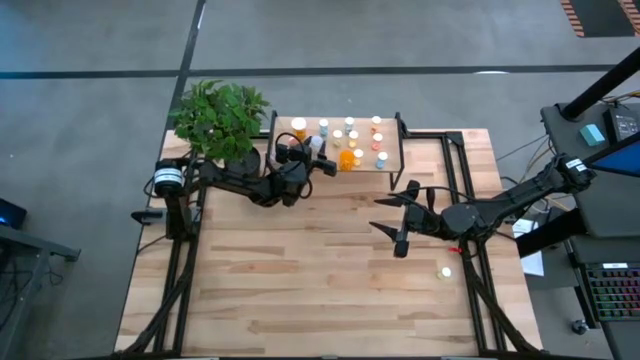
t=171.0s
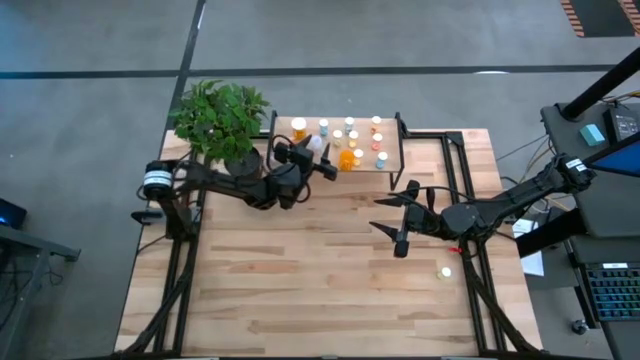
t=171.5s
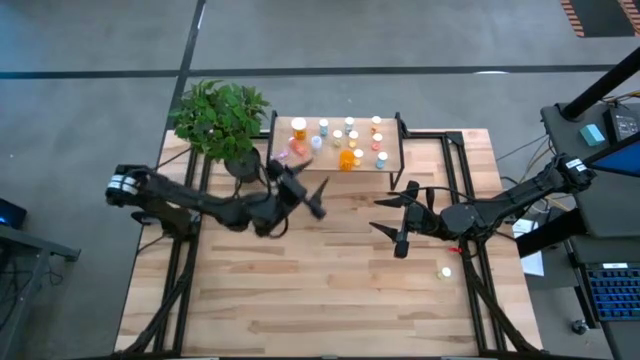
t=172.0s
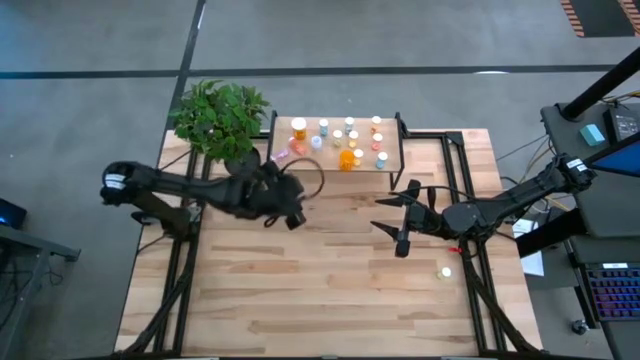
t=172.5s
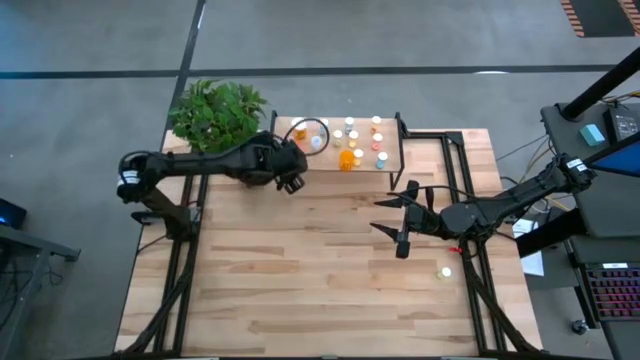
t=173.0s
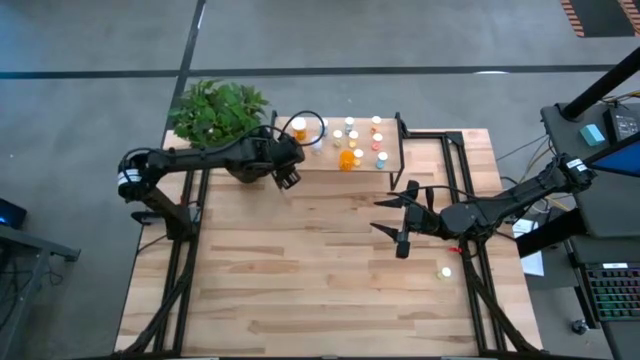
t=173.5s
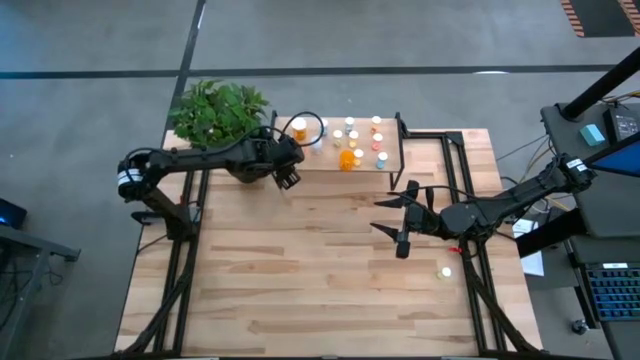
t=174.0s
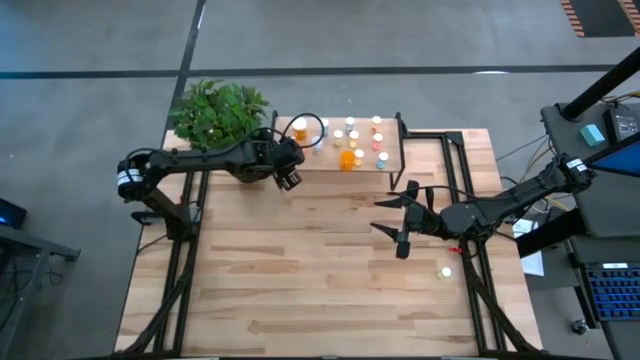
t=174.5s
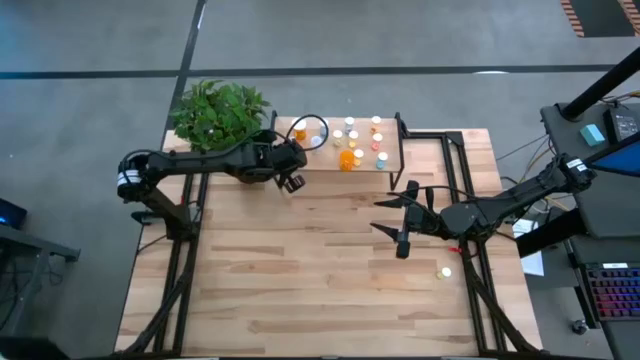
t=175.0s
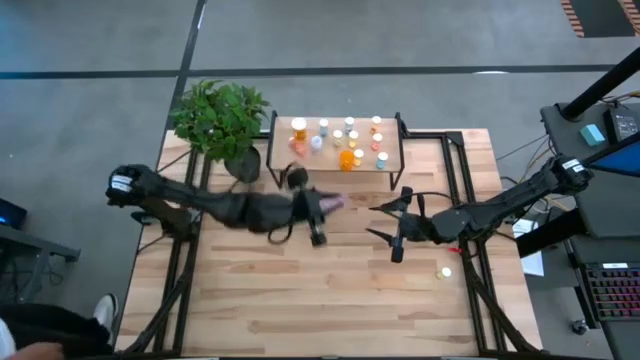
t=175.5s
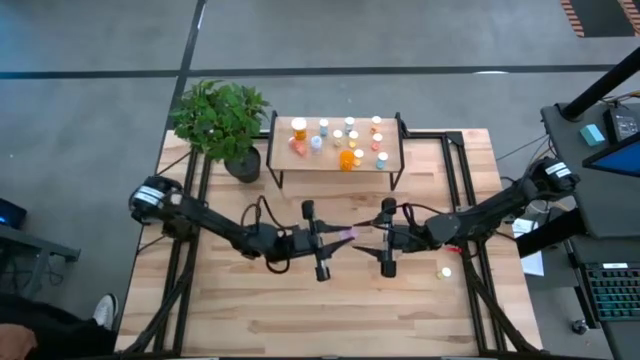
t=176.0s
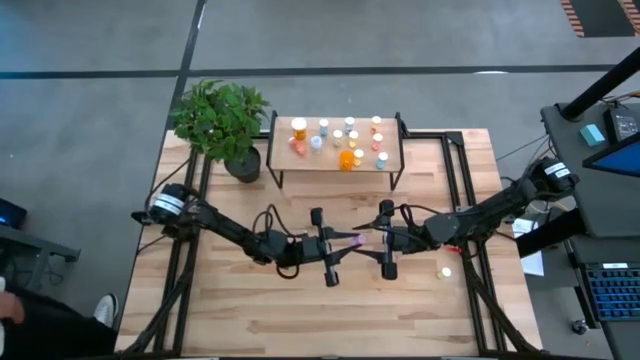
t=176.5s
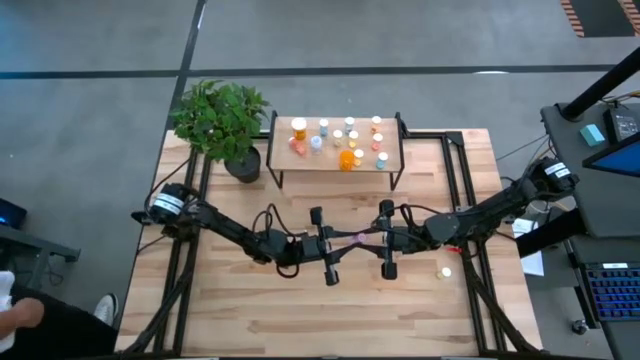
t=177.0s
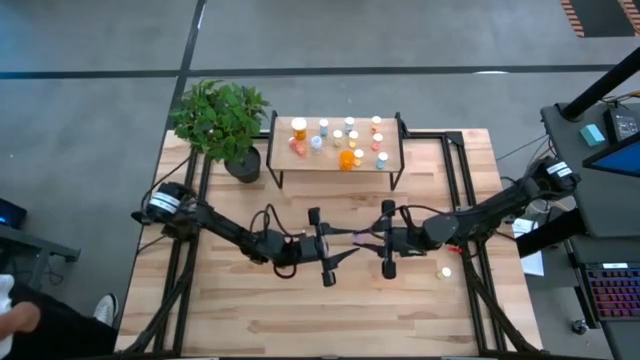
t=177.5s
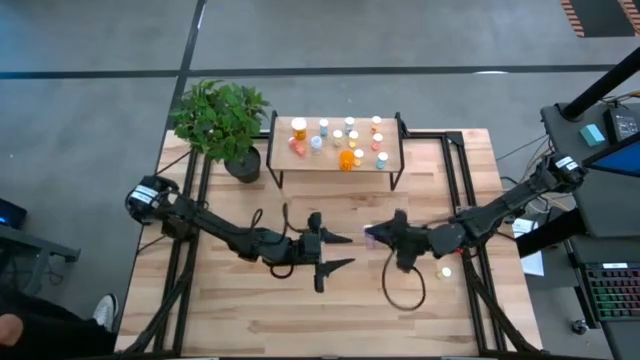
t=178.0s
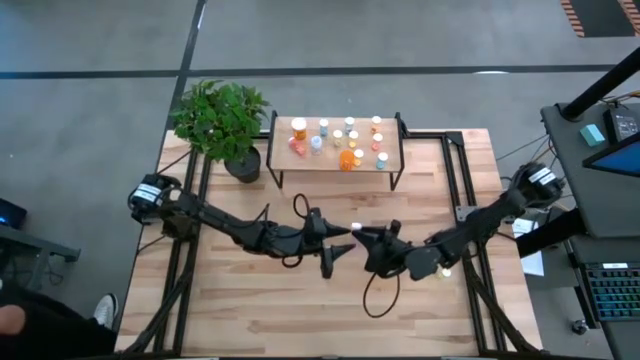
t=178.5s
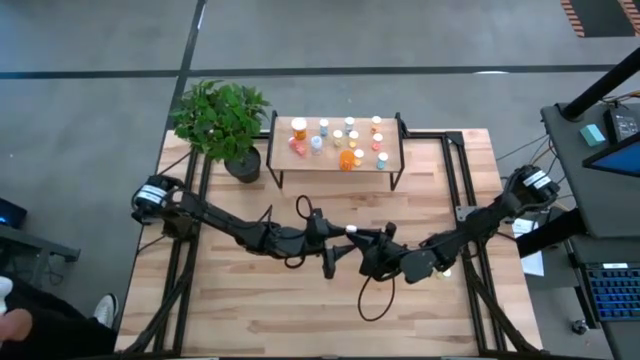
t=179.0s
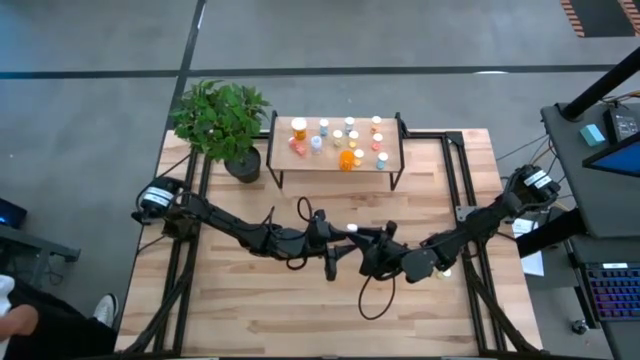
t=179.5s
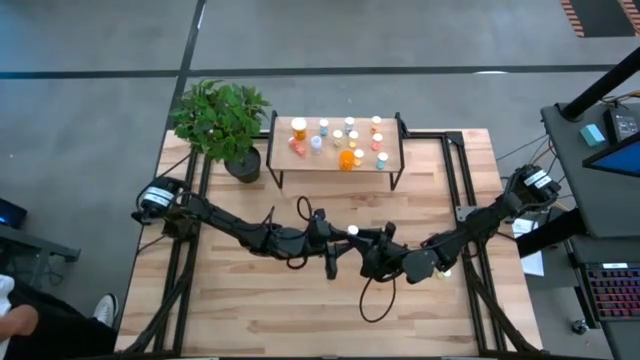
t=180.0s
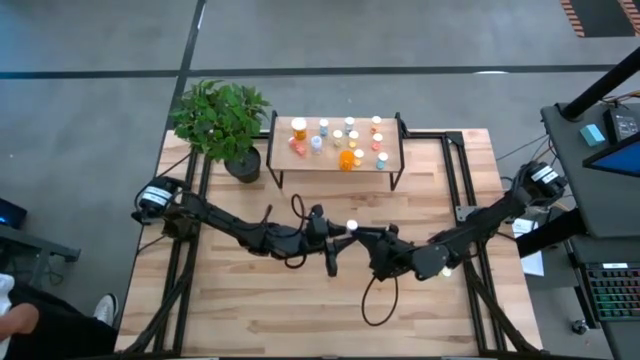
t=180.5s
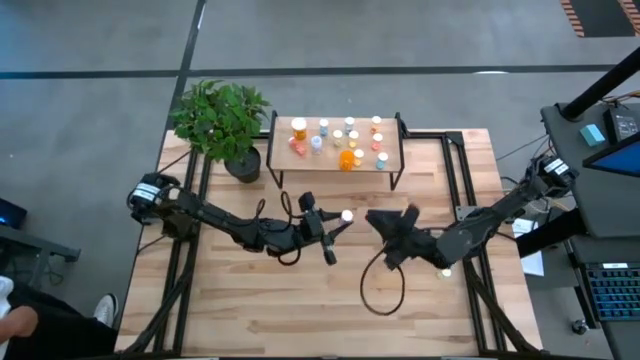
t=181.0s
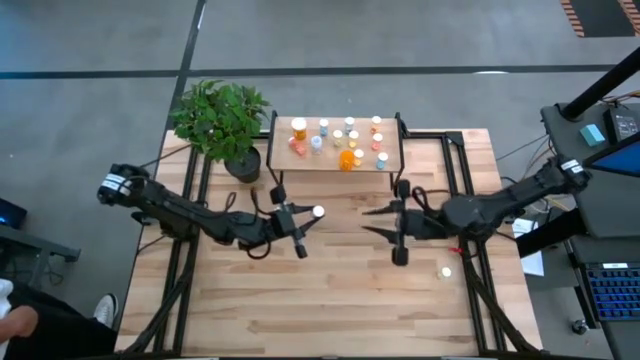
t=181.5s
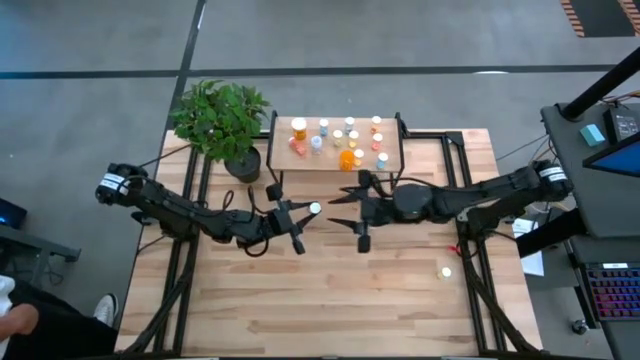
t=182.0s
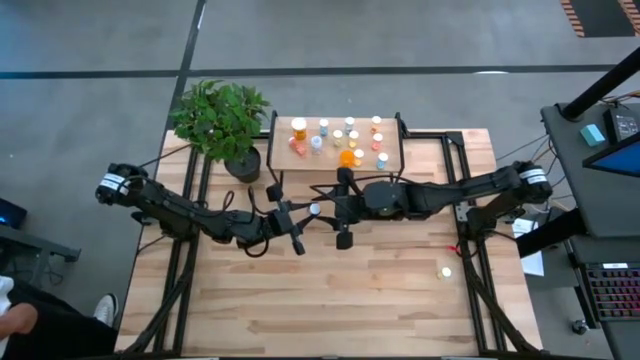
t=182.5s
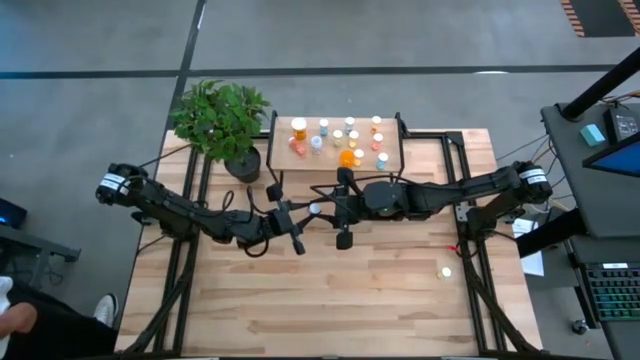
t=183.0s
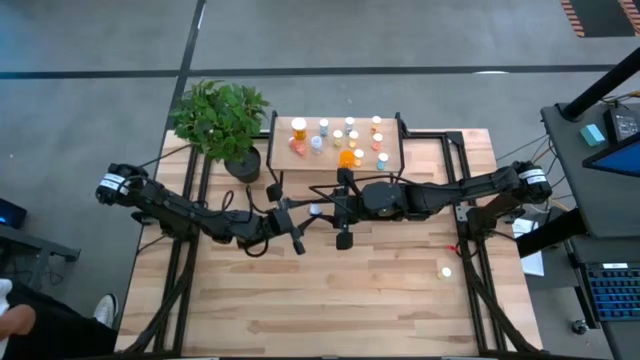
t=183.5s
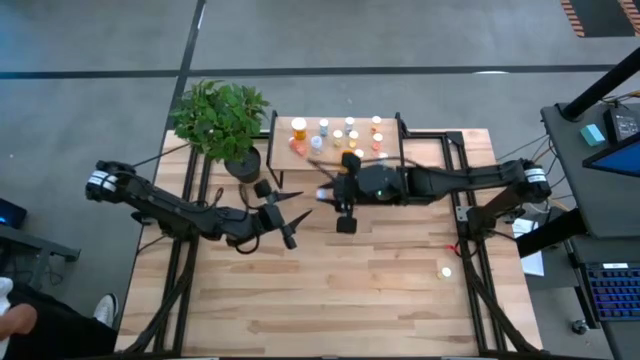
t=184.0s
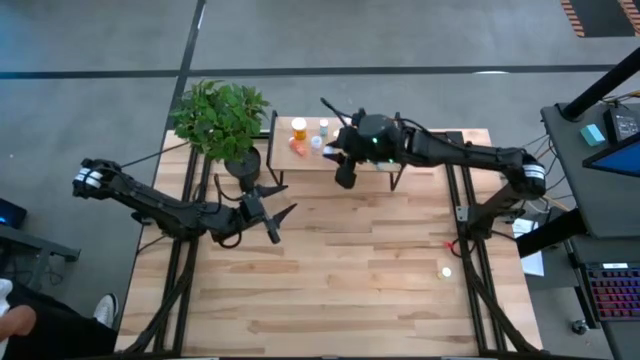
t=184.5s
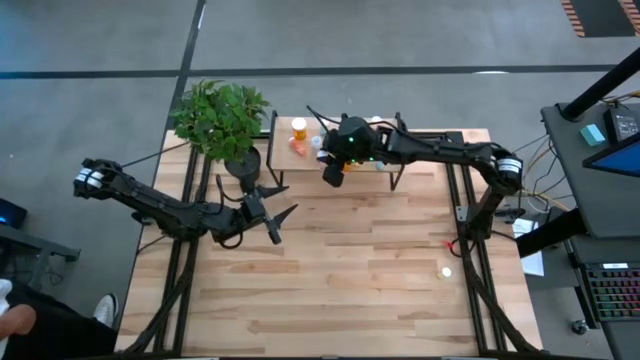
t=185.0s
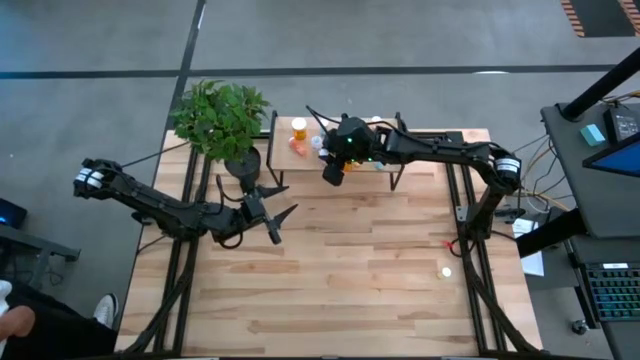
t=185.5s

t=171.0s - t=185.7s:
Task: Pick and place medicine bottles onto shelf by color
Adjust the pink pill bottle on the shelf

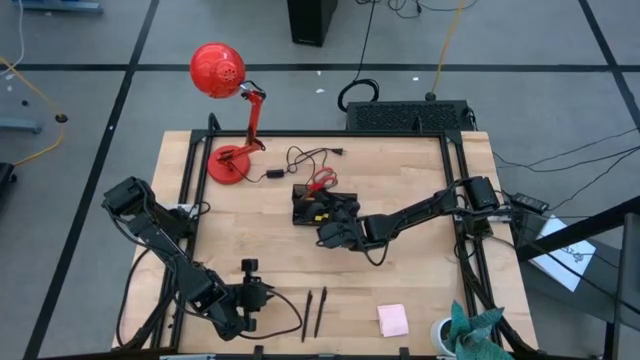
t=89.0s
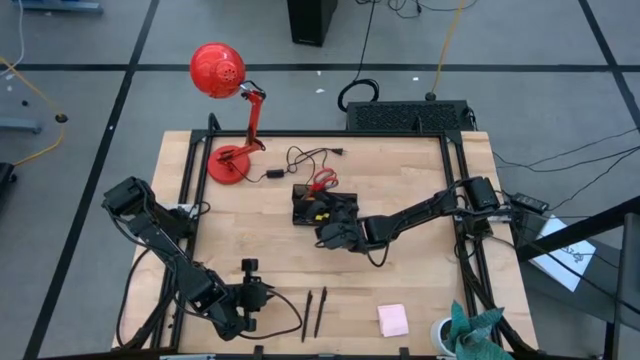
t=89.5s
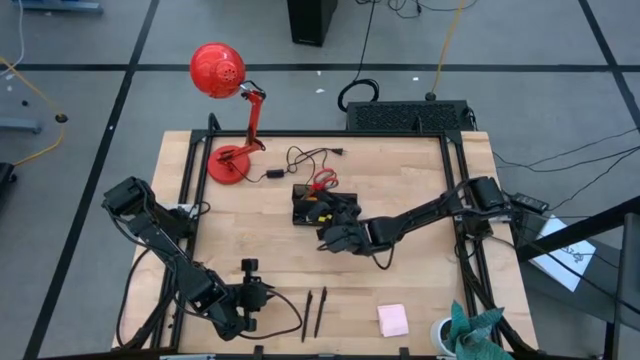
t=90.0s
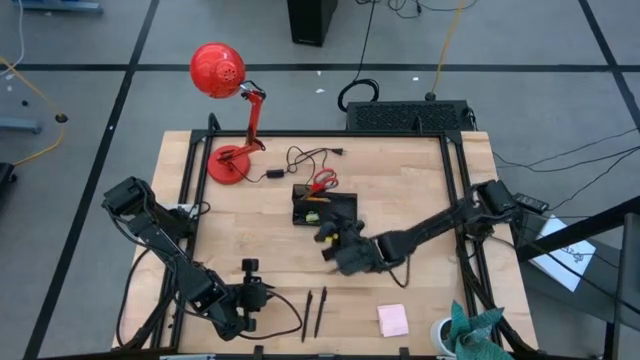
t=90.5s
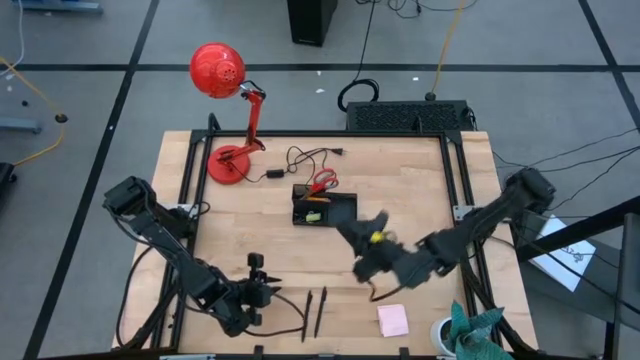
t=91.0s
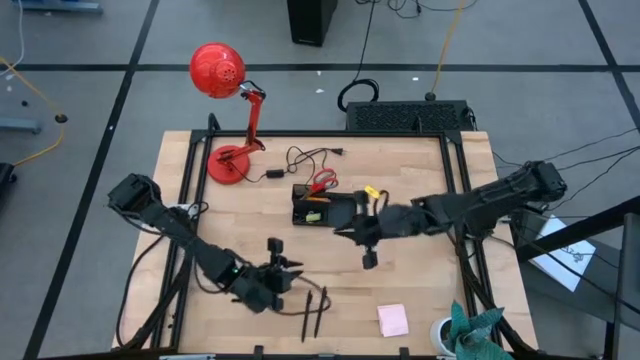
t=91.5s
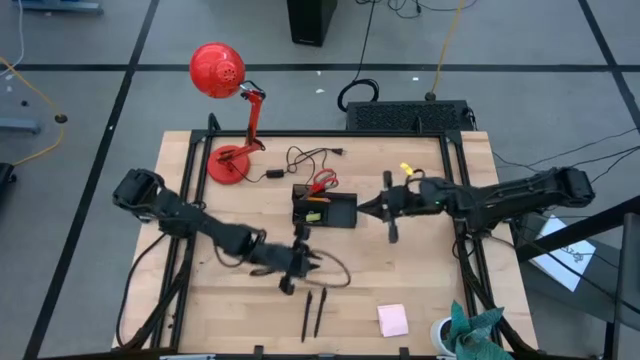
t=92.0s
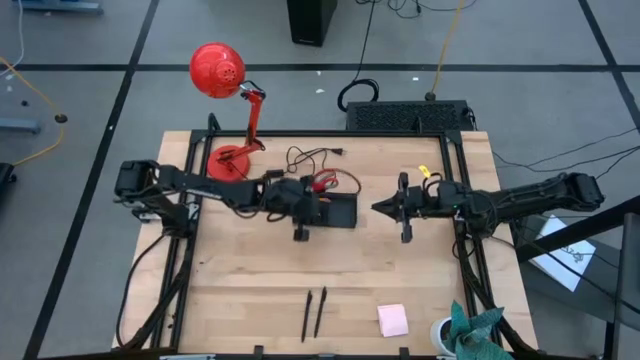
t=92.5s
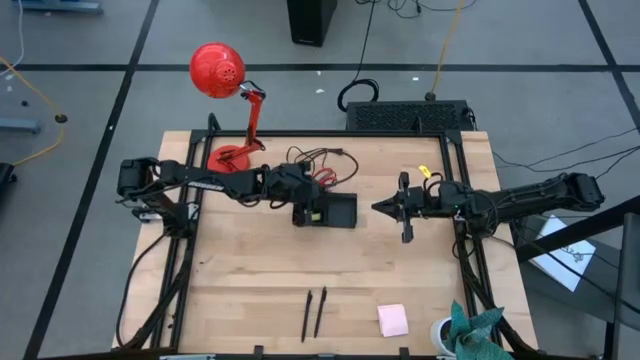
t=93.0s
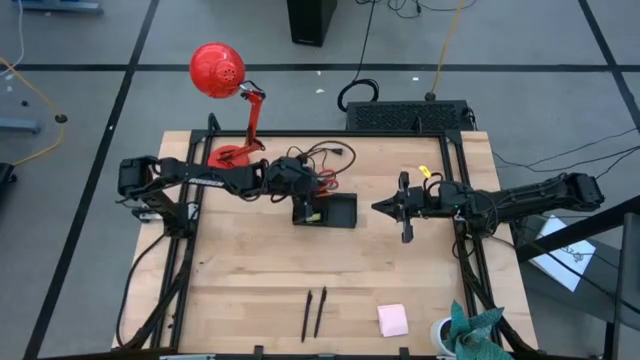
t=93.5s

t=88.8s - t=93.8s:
Task: Pick and place office supplies into organizer
Adjust the orange pencils

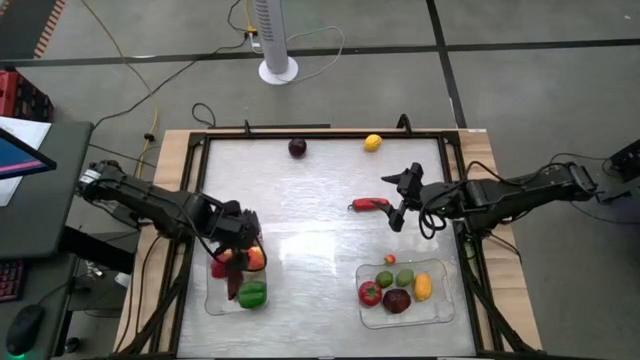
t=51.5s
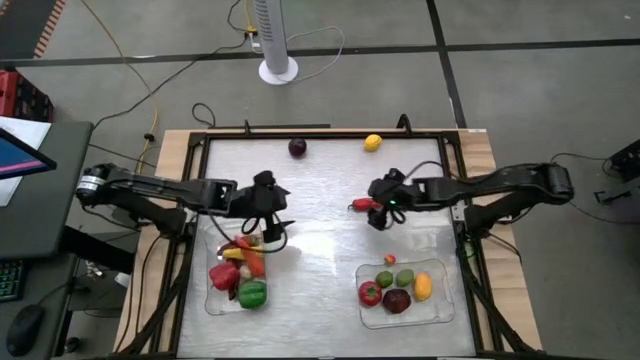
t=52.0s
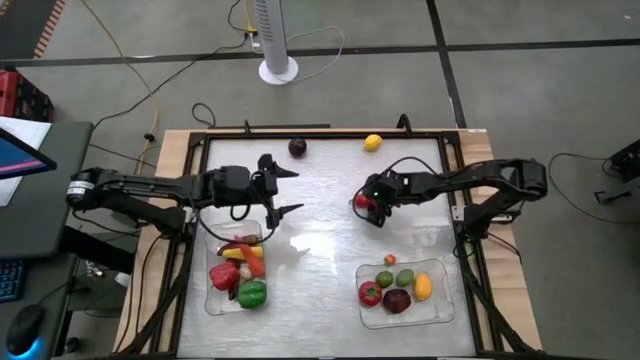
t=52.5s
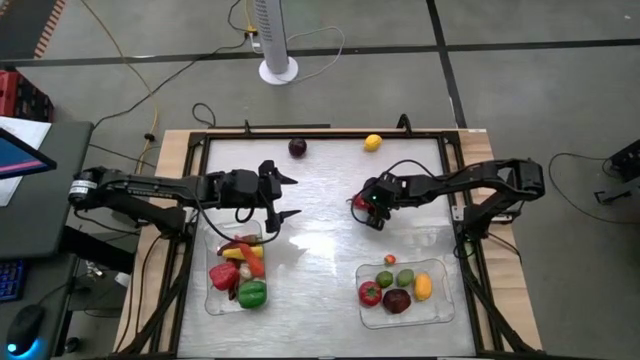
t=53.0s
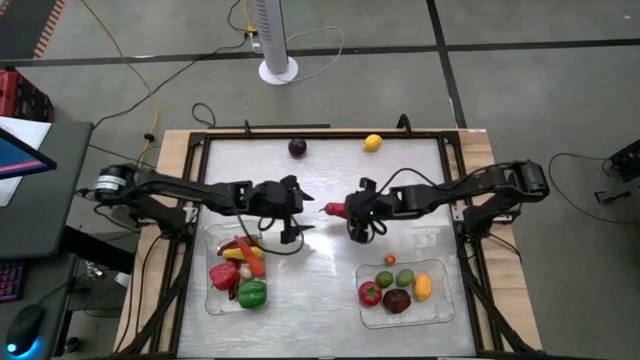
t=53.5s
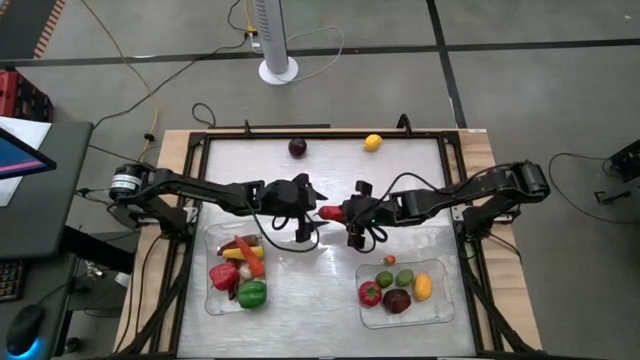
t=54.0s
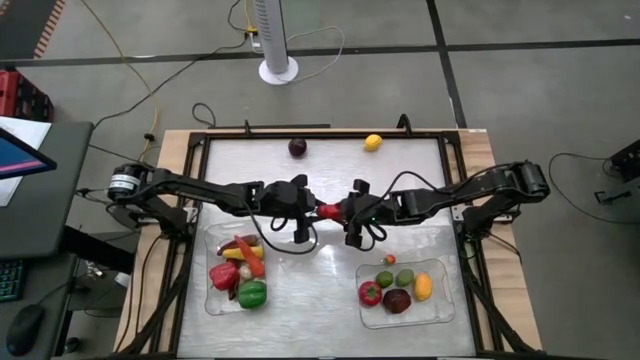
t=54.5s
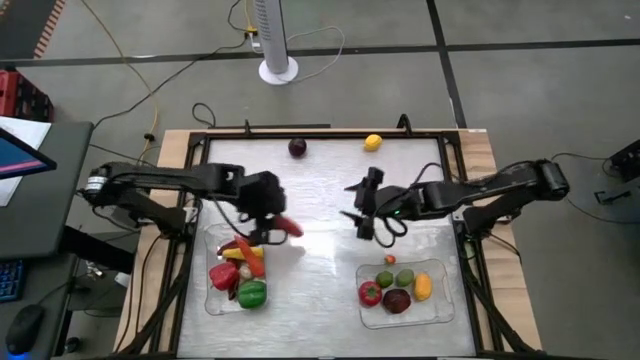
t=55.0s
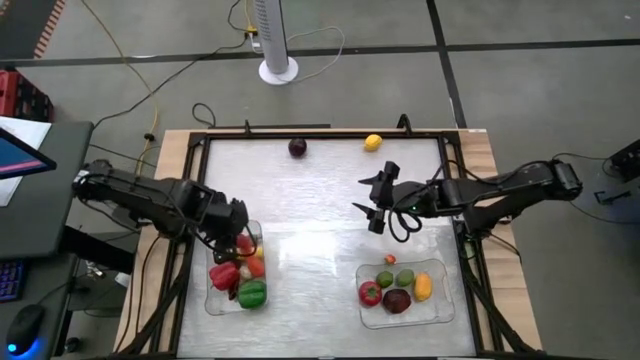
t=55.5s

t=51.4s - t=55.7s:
Task: Sort produce into baskets
Put the red chili pepper into the left transparent bin
